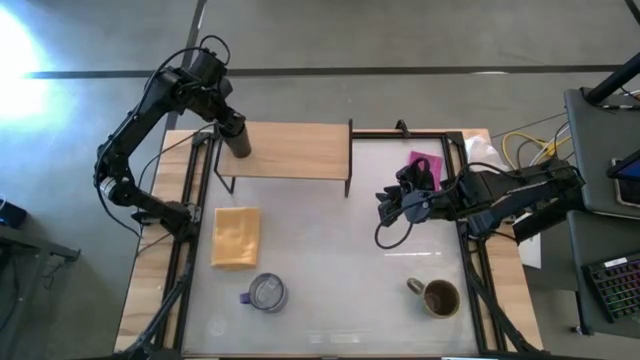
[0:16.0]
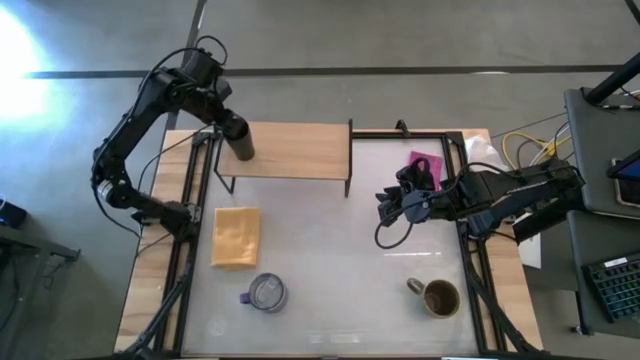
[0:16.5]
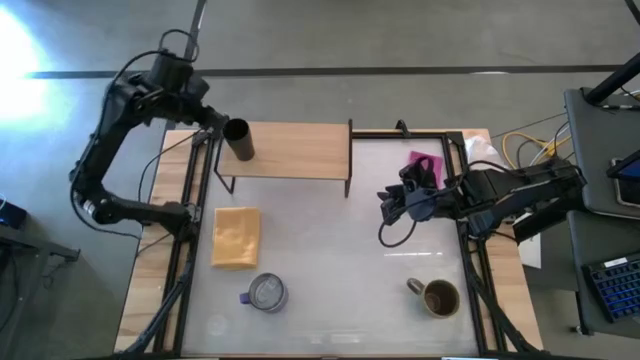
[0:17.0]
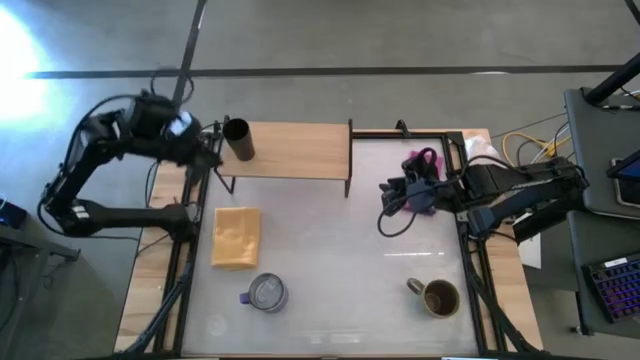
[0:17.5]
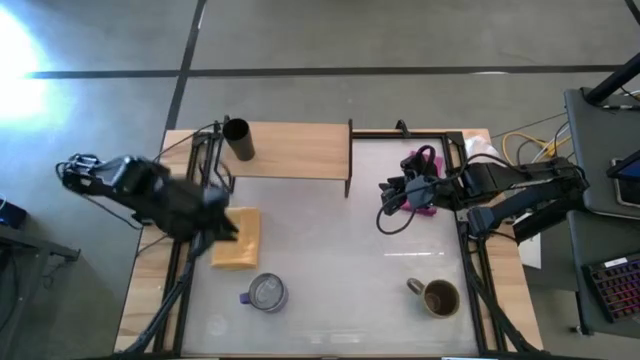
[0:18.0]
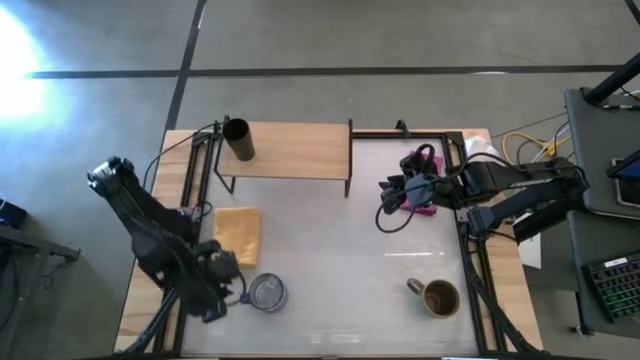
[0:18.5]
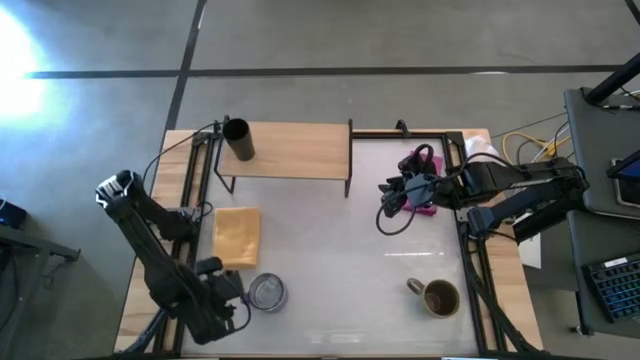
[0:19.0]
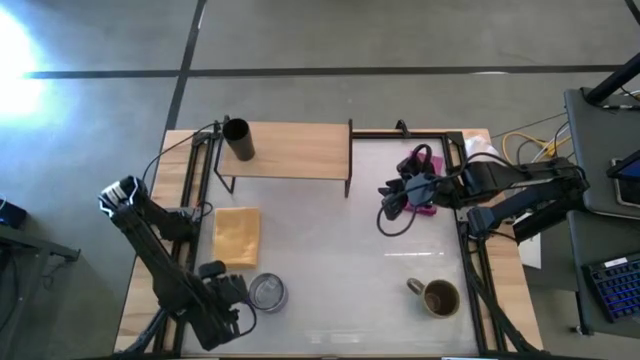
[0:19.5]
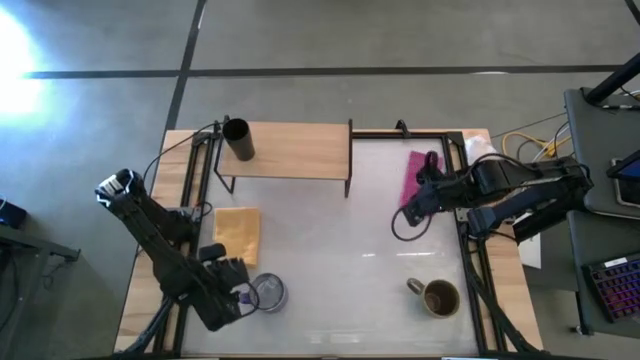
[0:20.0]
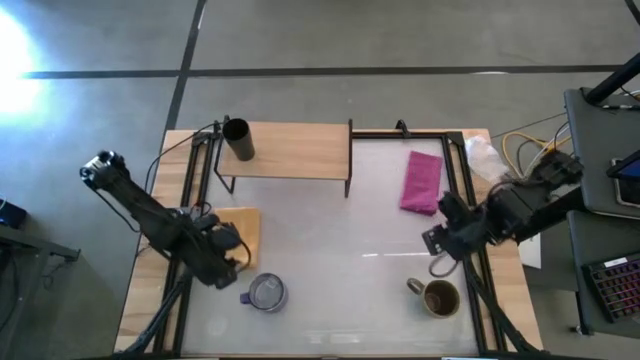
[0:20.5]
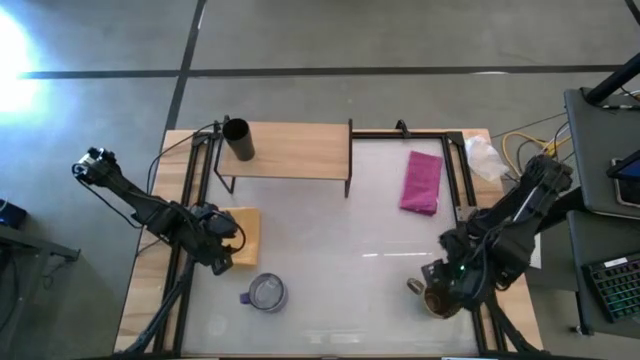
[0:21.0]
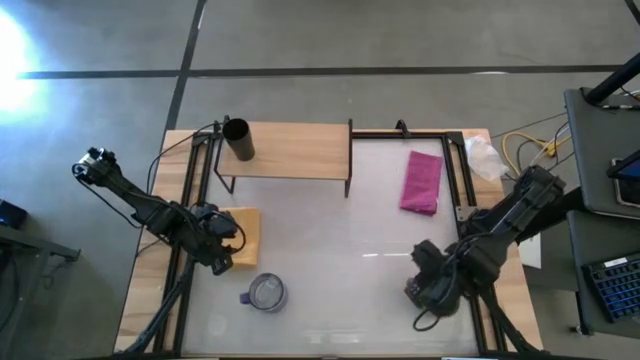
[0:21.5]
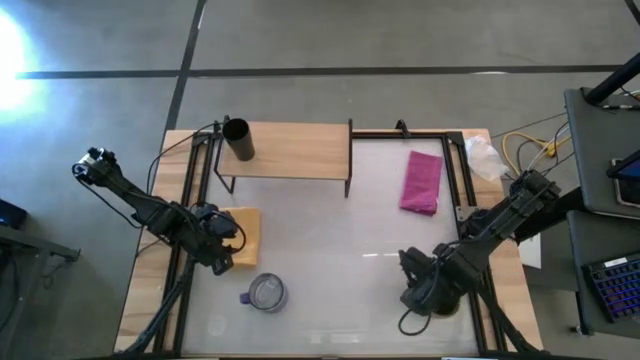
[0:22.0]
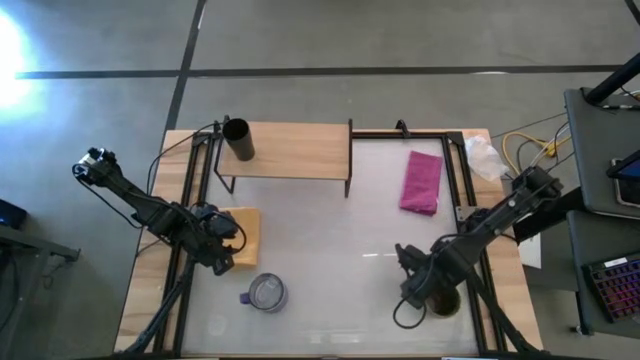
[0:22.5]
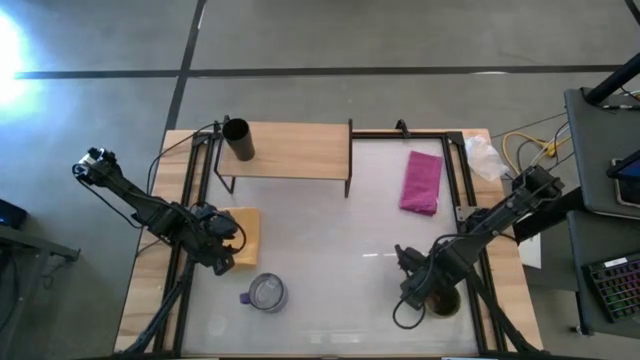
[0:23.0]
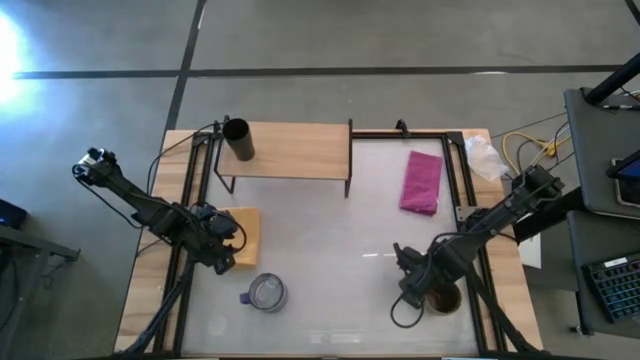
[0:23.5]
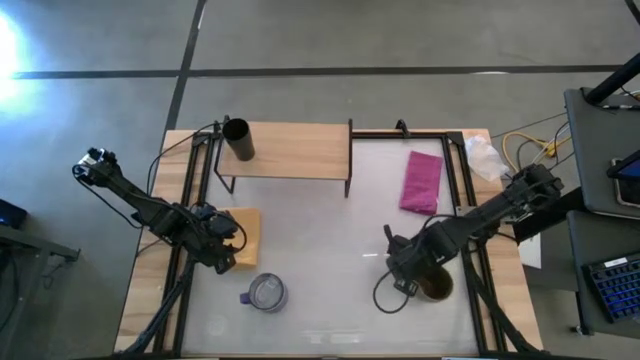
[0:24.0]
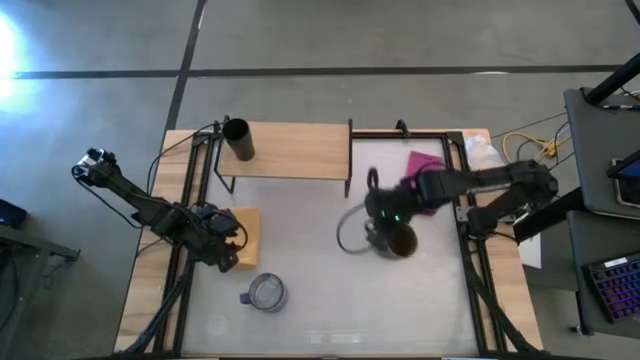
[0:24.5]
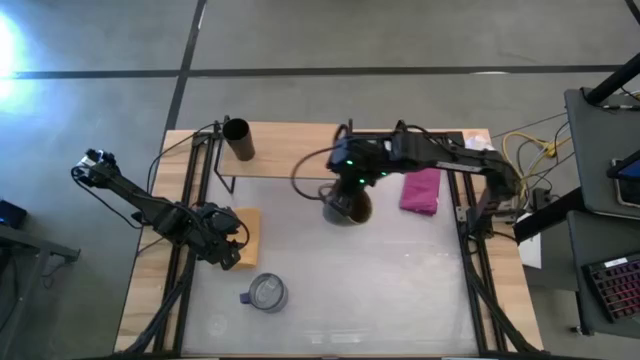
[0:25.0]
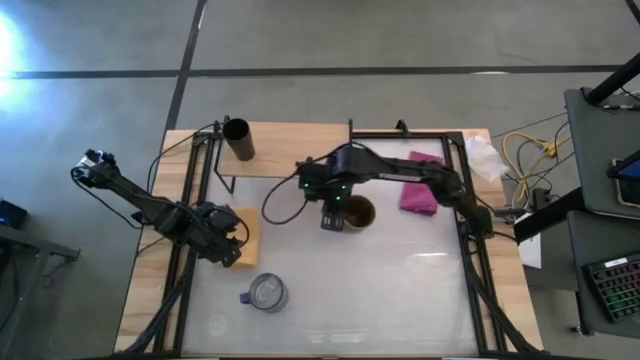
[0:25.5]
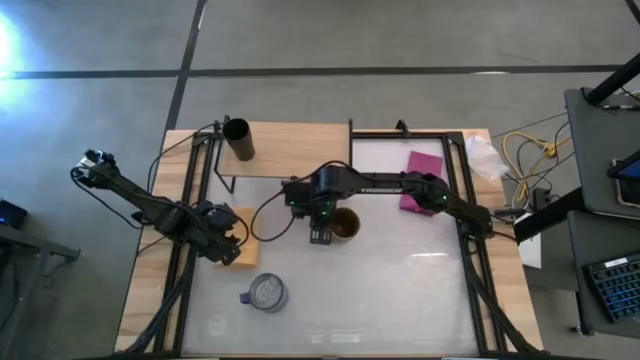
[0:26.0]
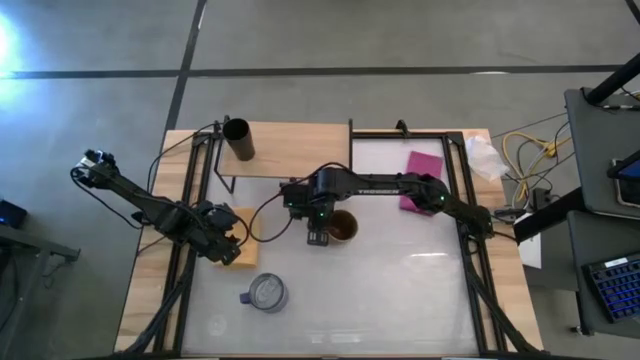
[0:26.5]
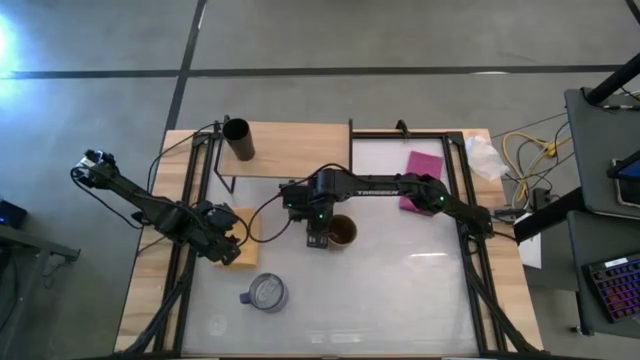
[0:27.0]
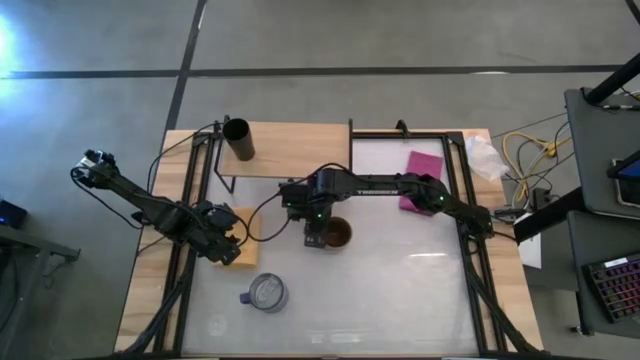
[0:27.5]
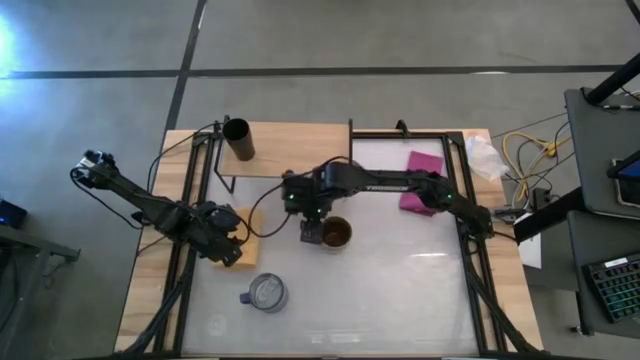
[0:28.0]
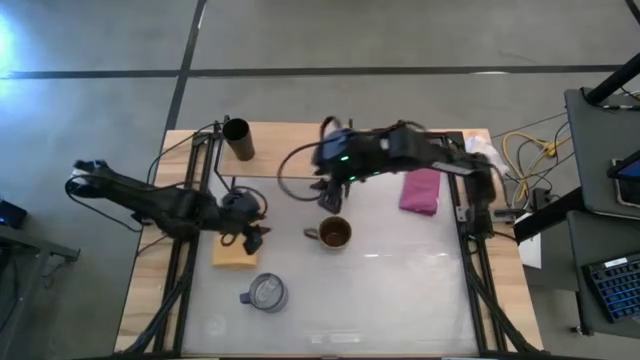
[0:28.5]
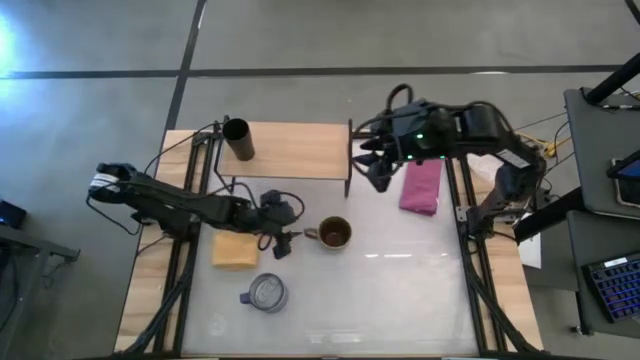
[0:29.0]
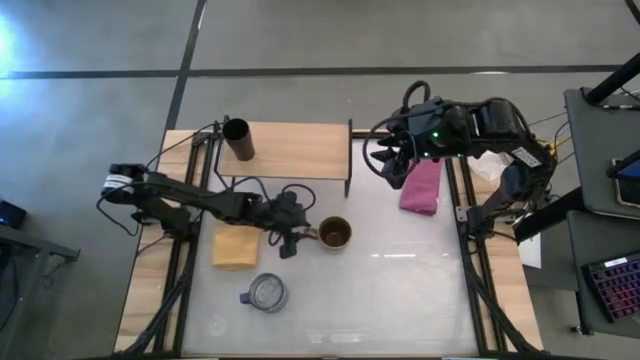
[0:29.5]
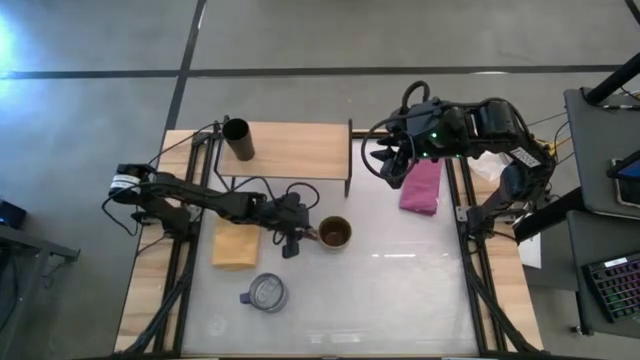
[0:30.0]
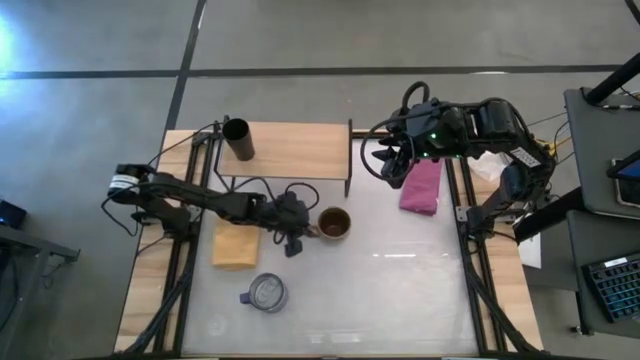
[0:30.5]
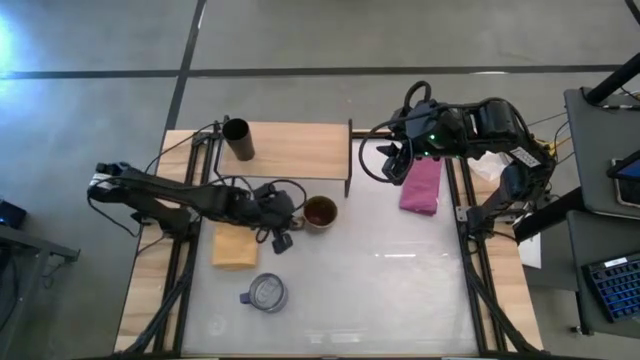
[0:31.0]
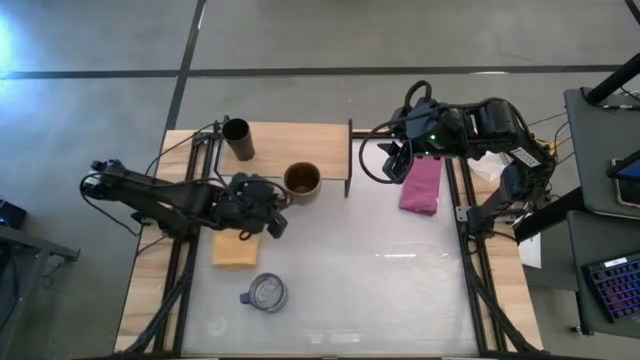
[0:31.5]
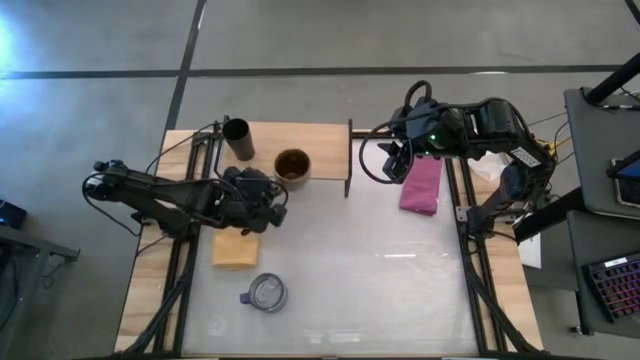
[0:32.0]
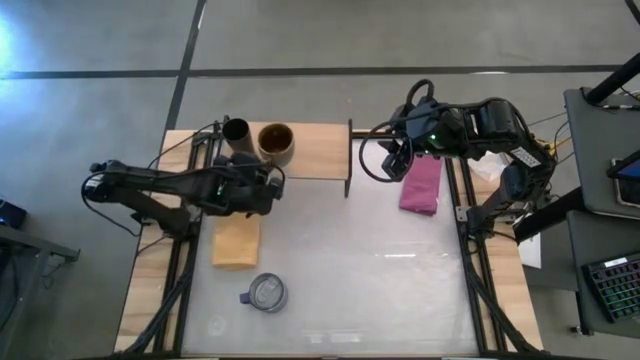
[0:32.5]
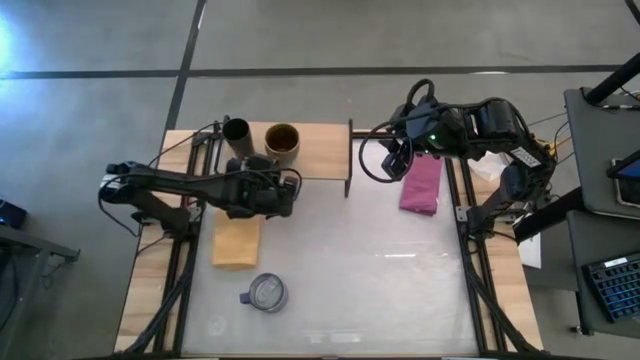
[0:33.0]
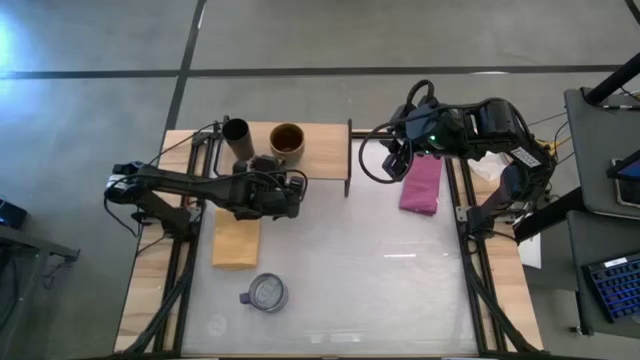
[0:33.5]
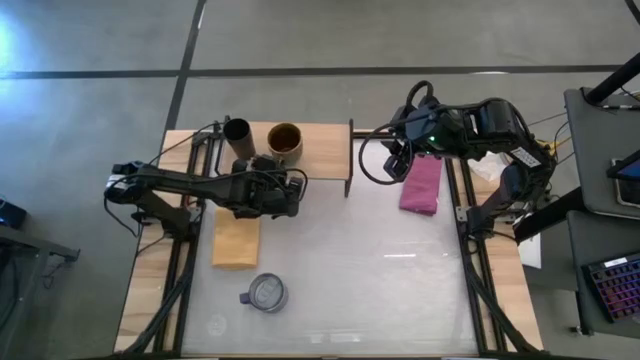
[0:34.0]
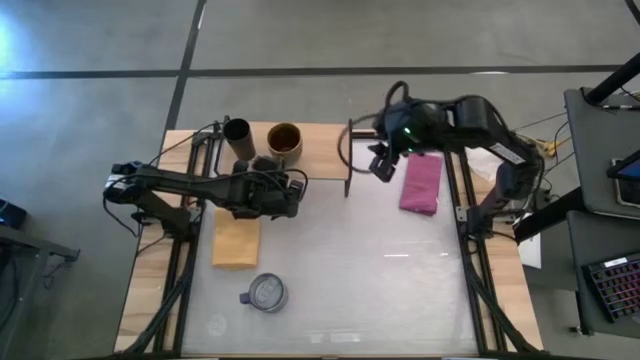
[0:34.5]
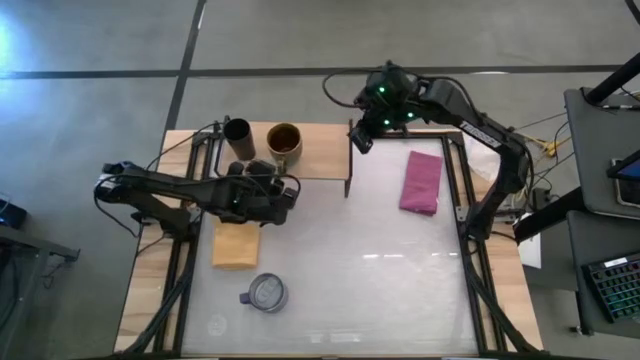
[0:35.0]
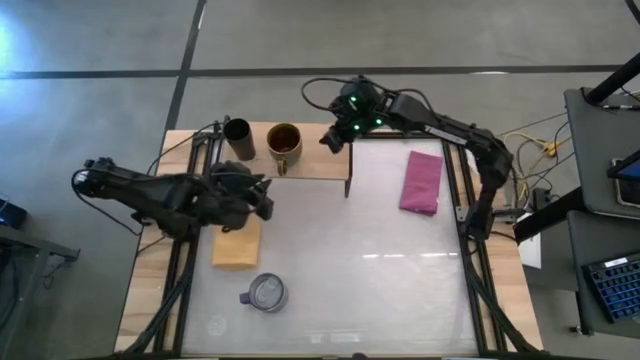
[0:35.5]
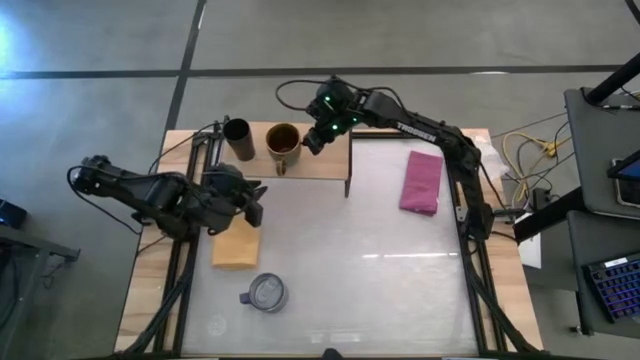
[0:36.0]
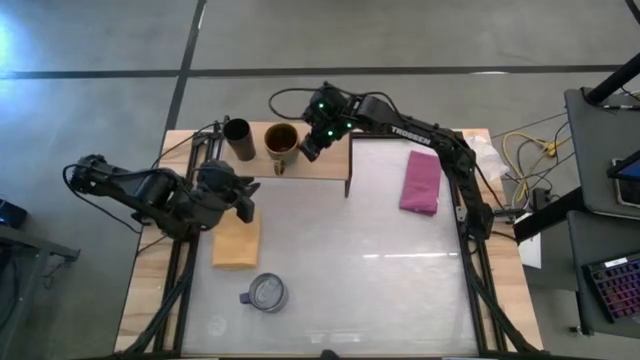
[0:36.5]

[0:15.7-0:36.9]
Task: Stack small to large cups/mugs on shelf
Put the green mug on the shelf
